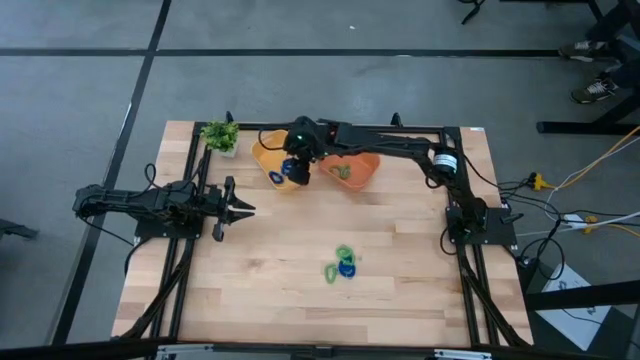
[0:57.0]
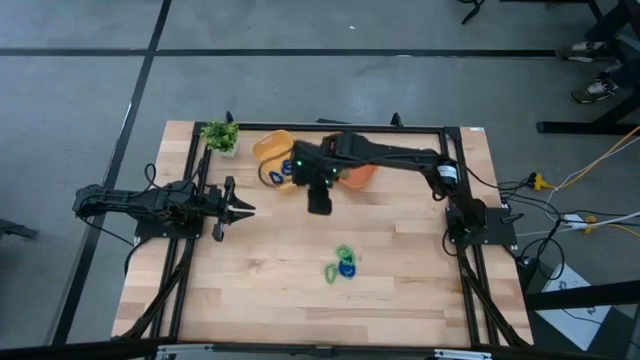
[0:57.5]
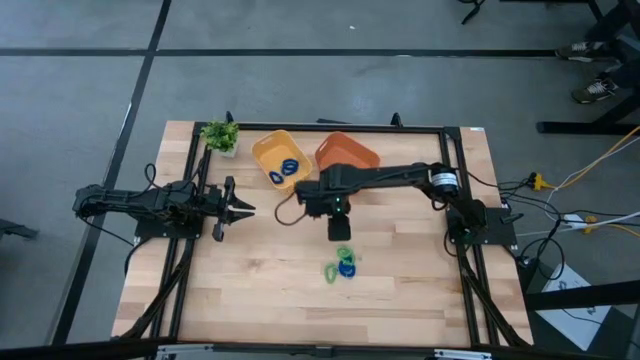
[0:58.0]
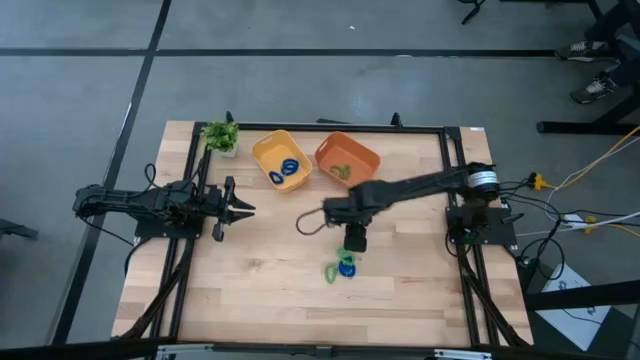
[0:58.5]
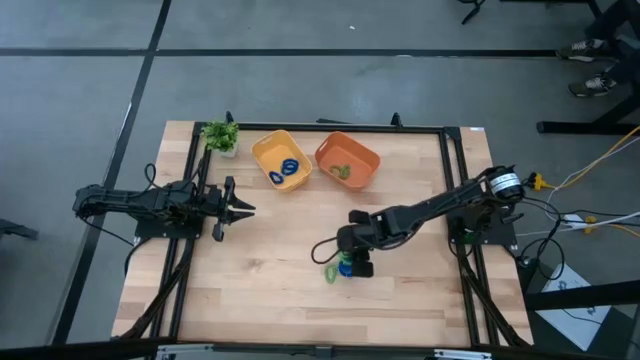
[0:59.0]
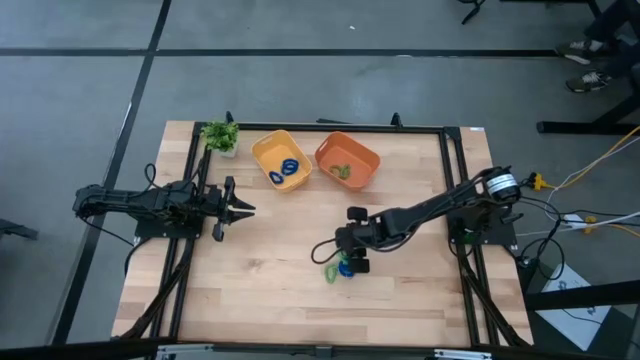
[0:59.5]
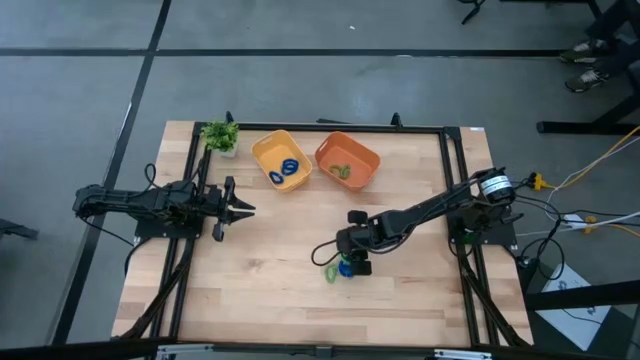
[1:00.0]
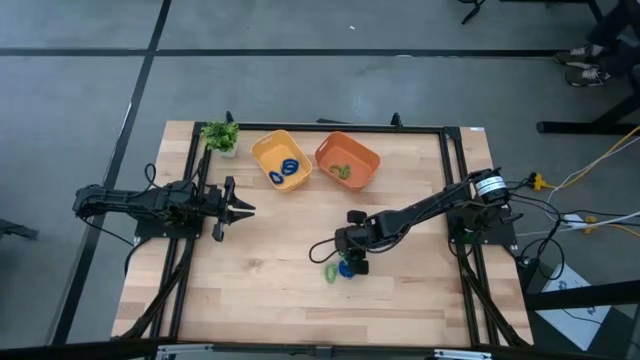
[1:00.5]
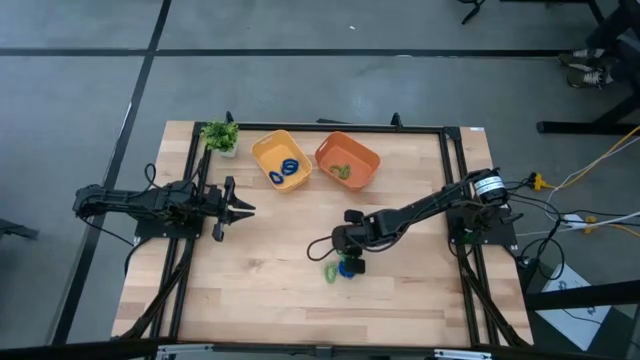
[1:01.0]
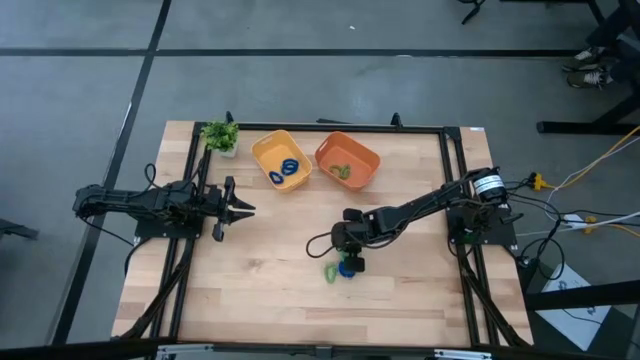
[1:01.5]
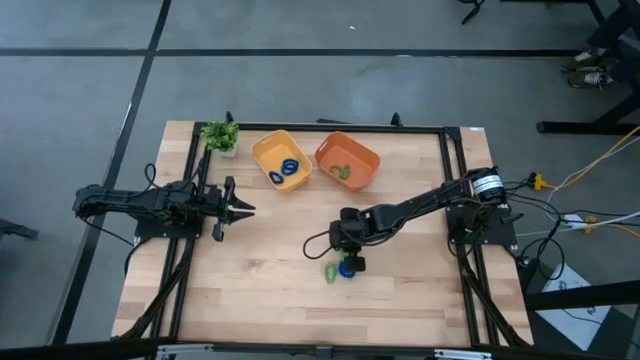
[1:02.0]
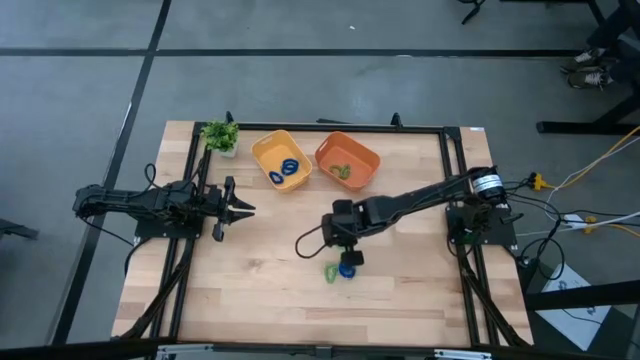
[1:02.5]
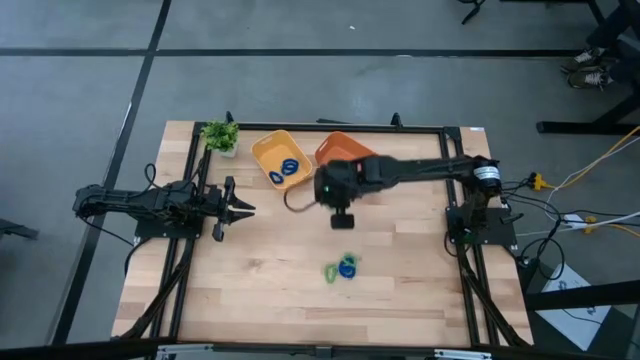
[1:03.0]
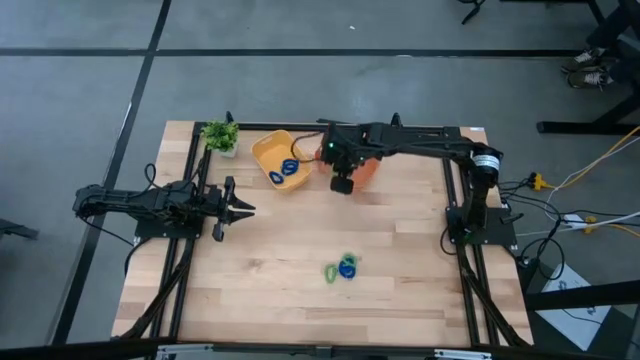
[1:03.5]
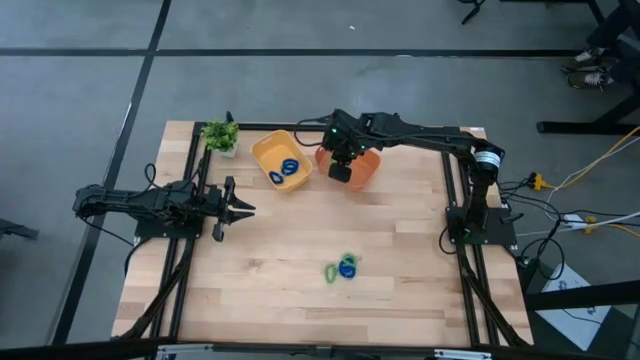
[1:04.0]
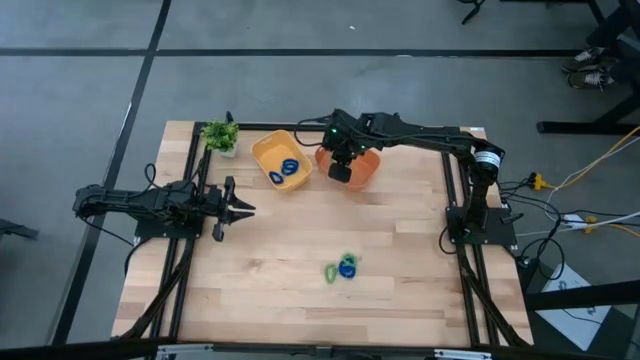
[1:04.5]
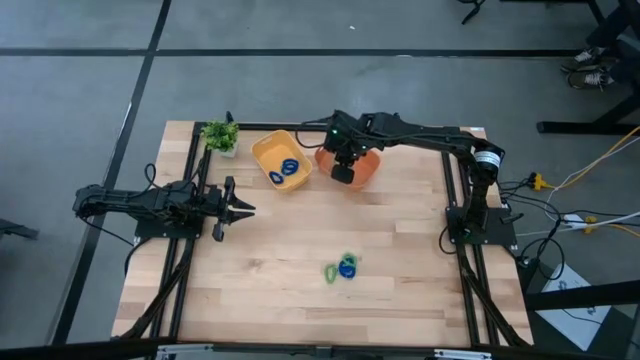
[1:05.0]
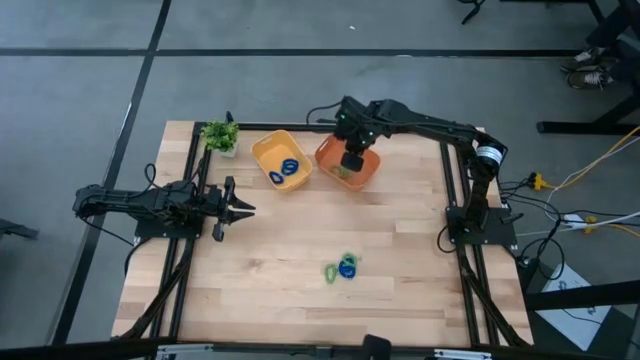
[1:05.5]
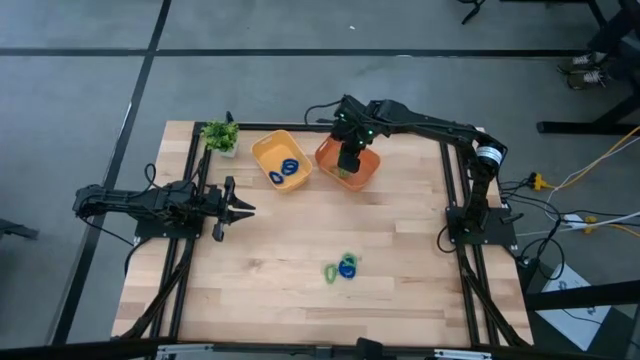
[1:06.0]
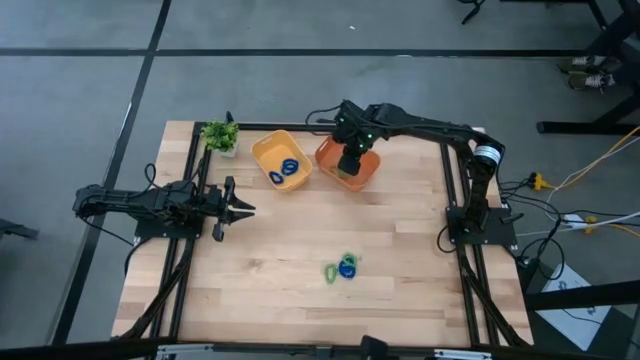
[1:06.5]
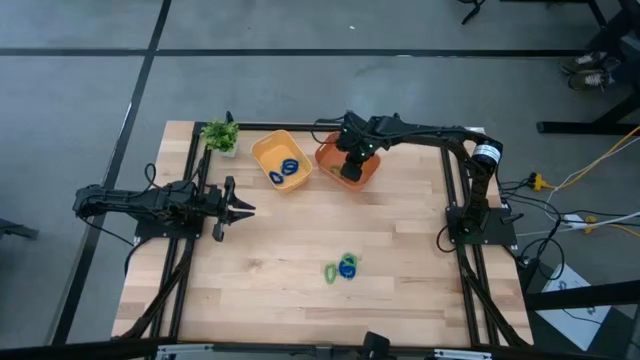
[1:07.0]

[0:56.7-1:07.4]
Task: Sort spring keychains
Put the green spring keychain into the orange bin

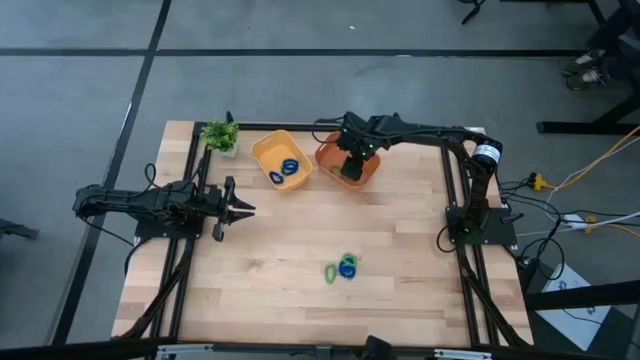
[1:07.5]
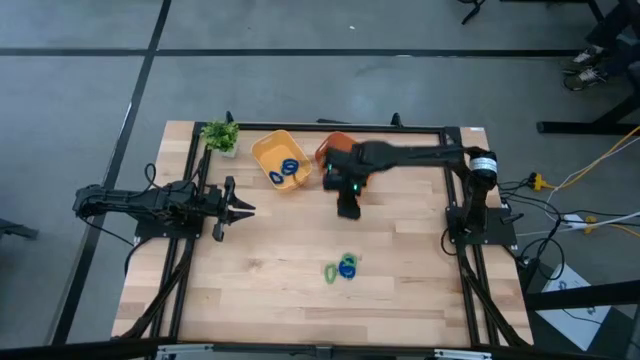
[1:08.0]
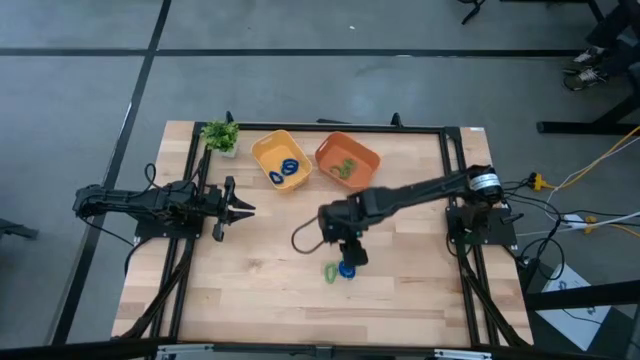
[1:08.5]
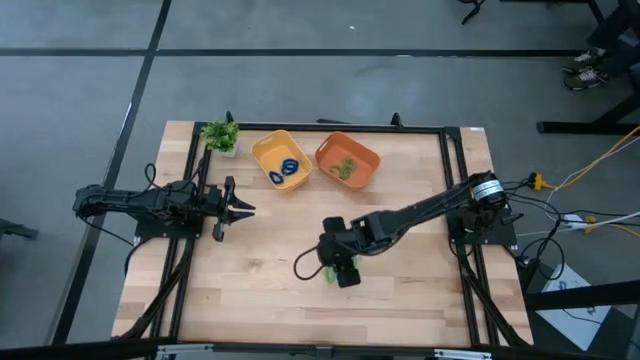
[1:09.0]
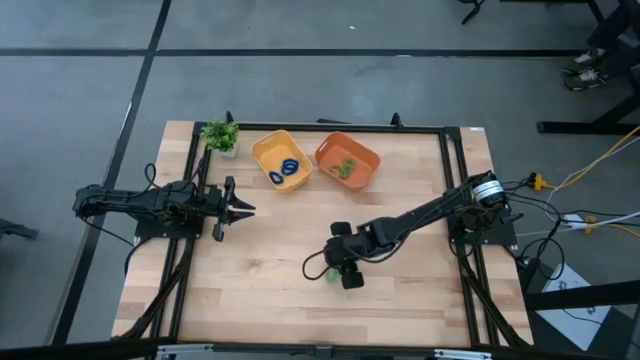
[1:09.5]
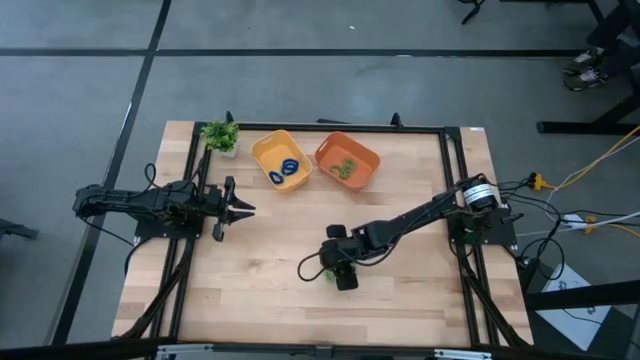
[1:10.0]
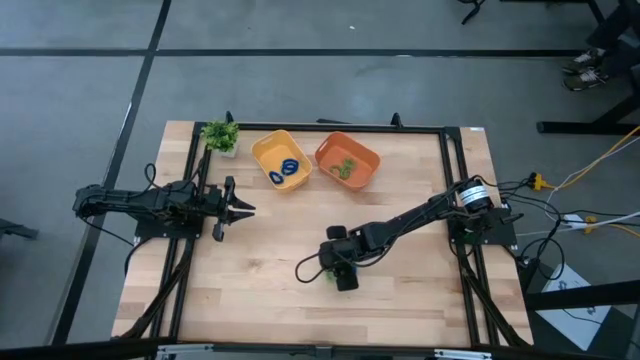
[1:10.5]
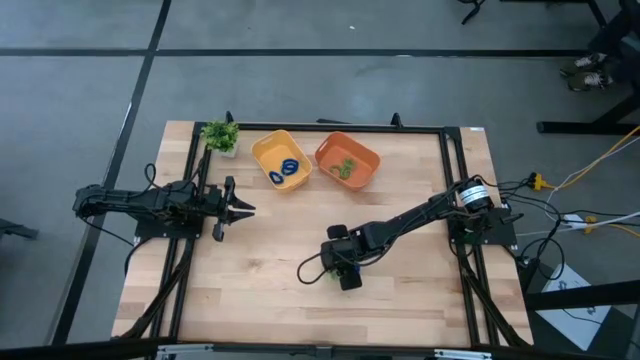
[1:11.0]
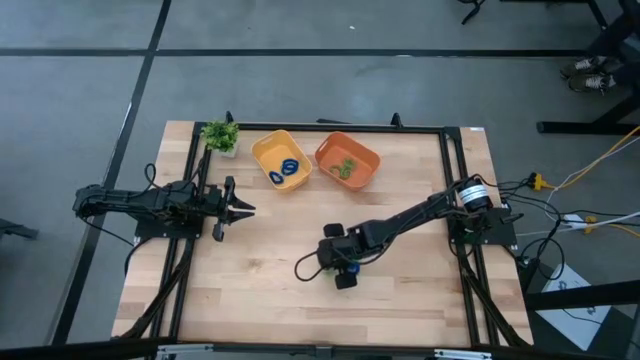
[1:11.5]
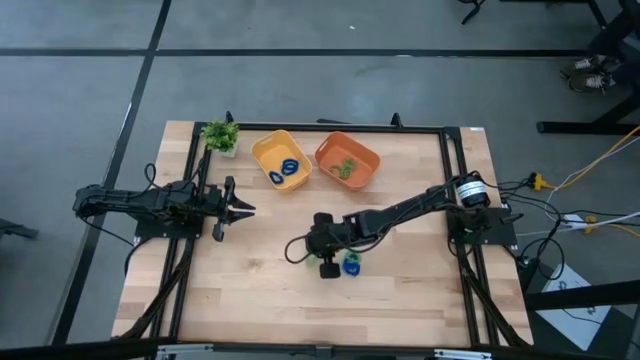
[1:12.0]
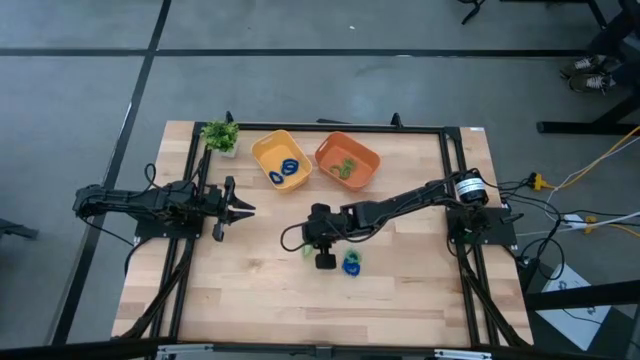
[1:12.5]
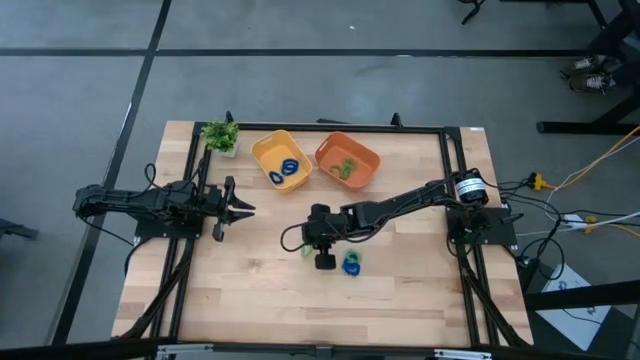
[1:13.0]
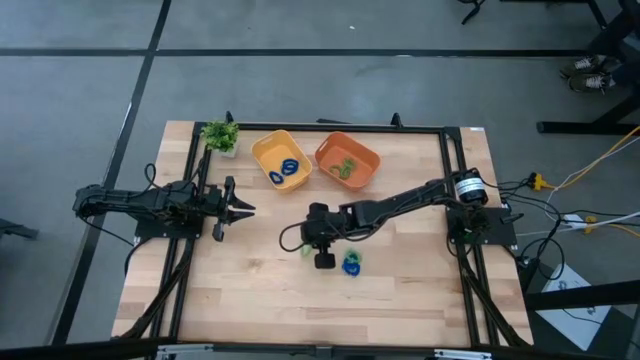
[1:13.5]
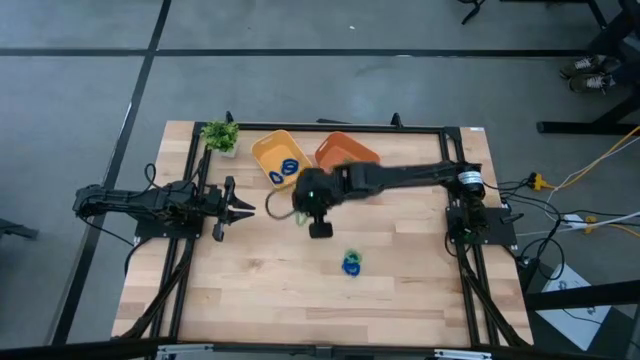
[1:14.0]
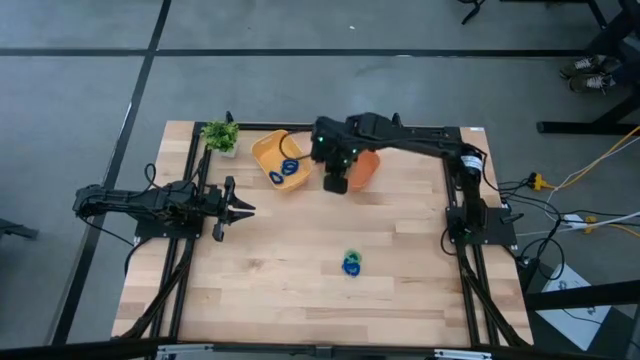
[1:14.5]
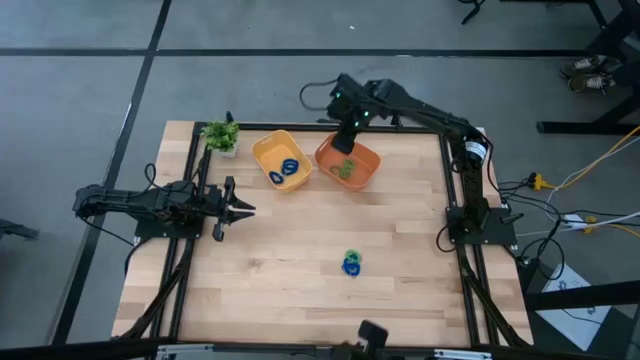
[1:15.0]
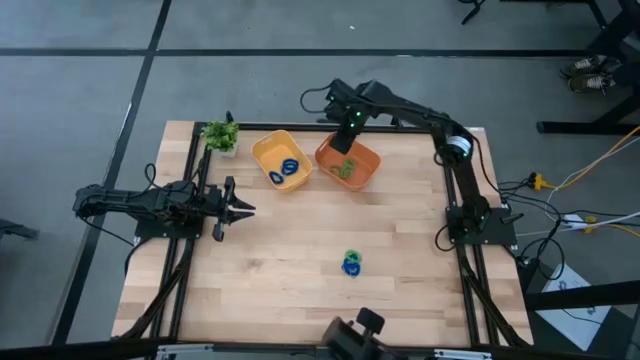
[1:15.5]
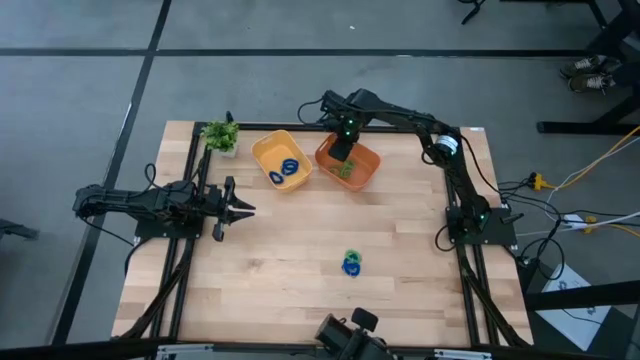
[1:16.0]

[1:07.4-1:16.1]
Put the green spring keychain into the orange bin

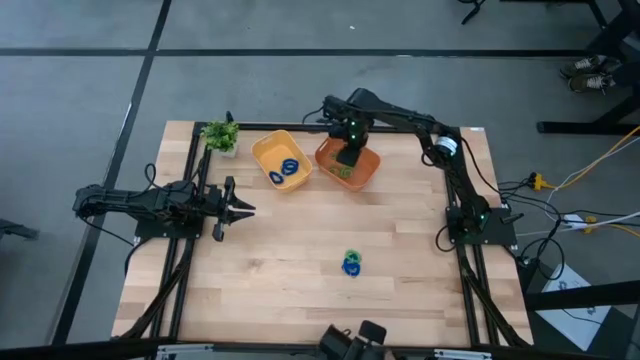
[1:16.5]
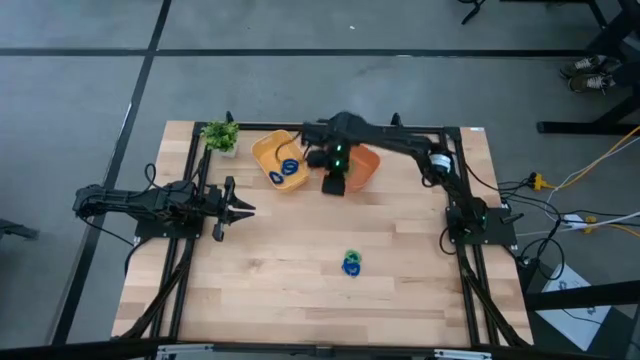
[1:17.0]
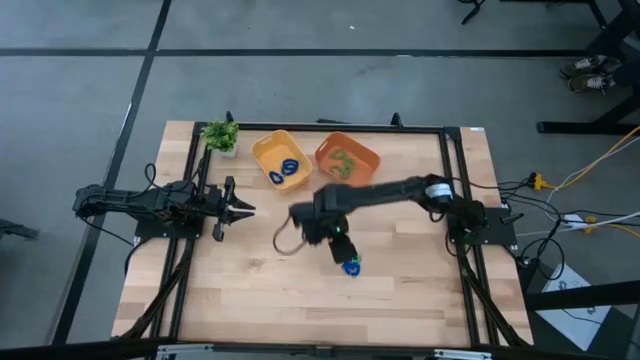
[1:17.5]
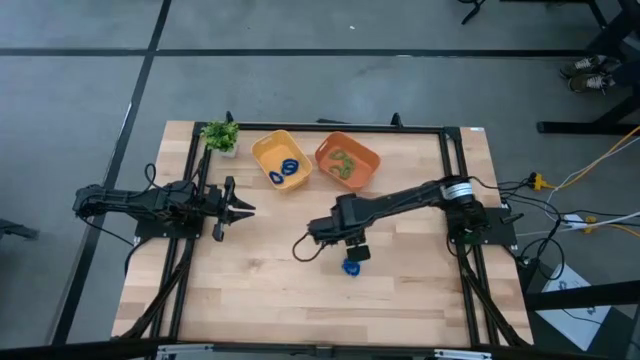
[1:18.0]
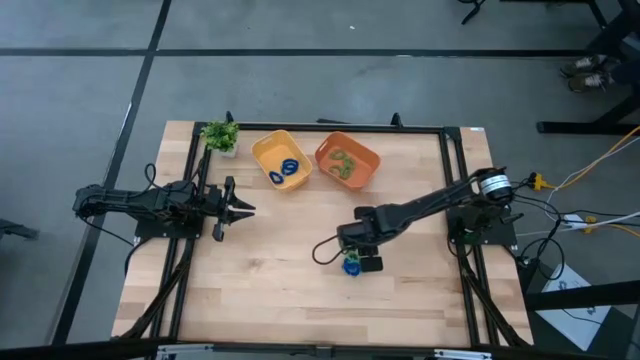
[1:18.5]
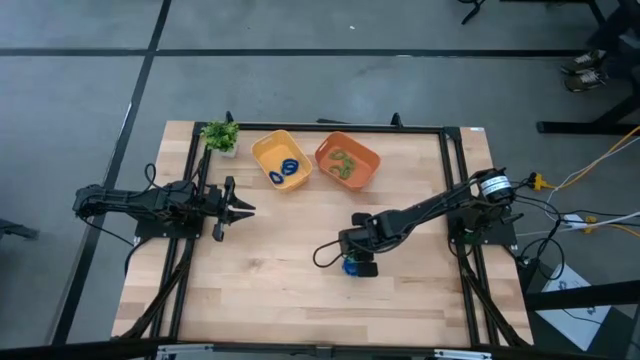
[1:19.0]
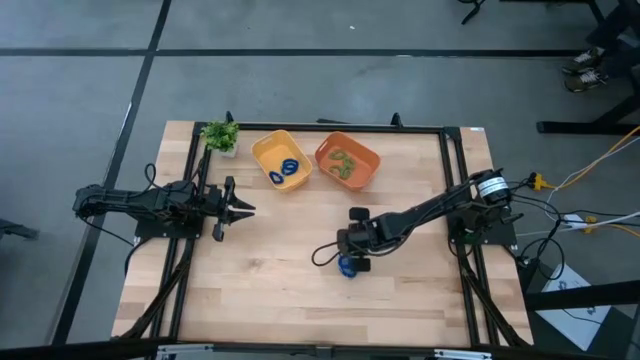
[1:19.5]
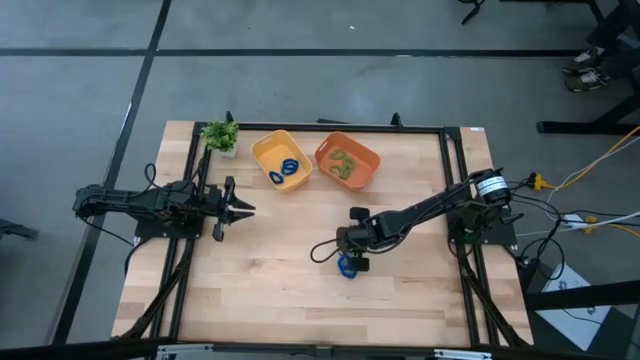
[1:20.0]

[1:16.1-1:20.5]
Put the green spring keychain into the orange bin
